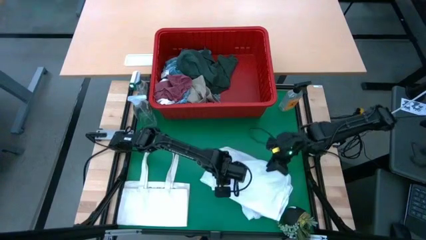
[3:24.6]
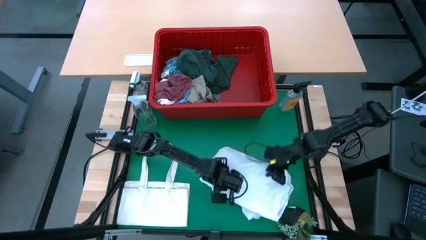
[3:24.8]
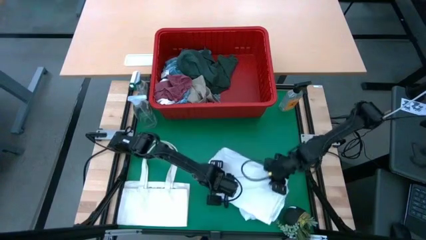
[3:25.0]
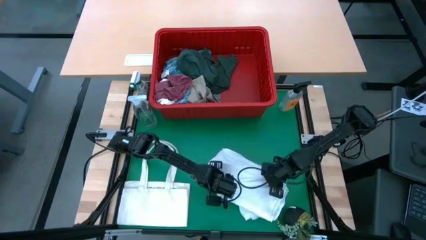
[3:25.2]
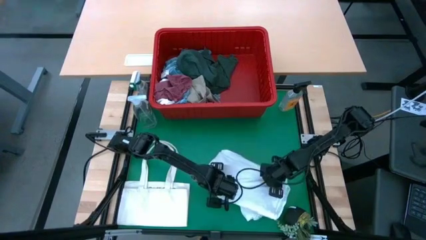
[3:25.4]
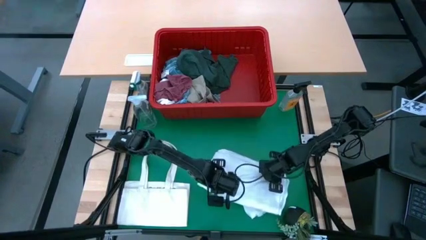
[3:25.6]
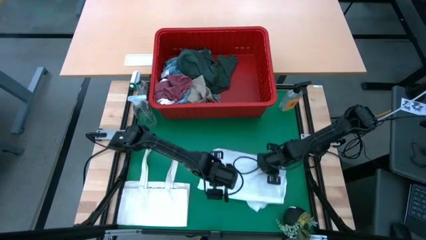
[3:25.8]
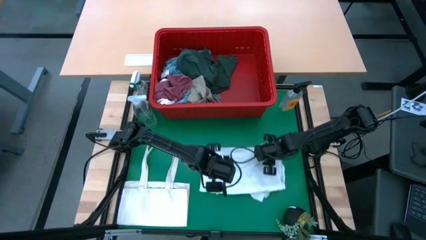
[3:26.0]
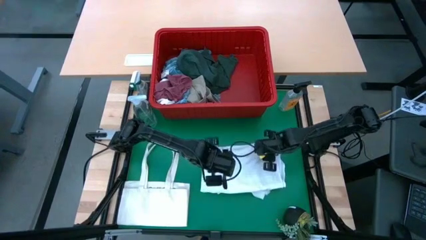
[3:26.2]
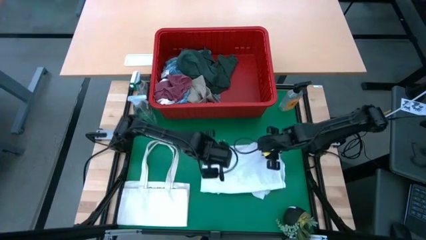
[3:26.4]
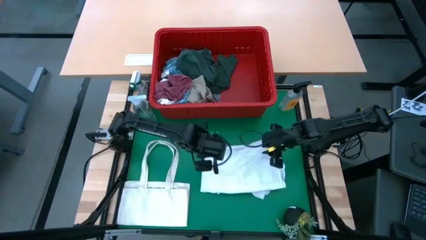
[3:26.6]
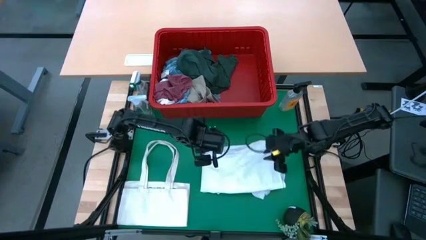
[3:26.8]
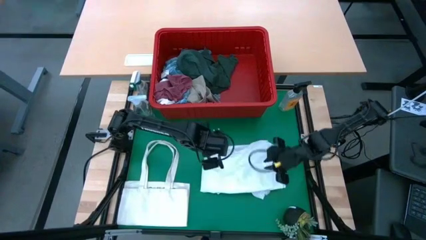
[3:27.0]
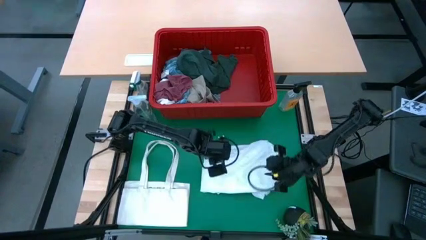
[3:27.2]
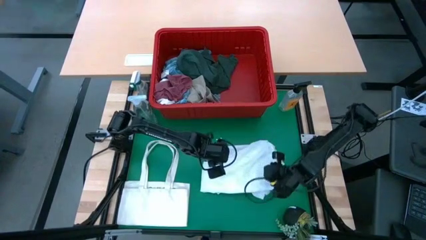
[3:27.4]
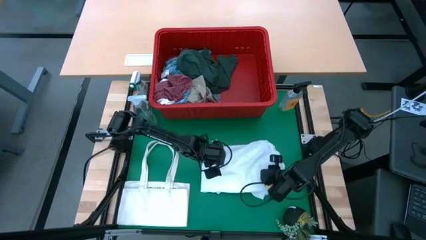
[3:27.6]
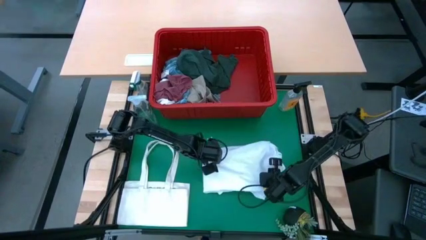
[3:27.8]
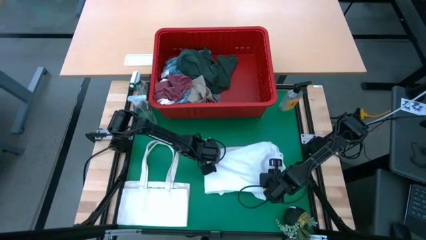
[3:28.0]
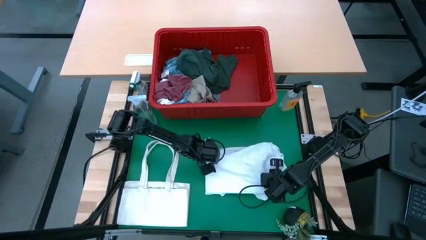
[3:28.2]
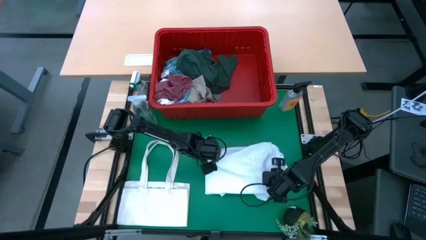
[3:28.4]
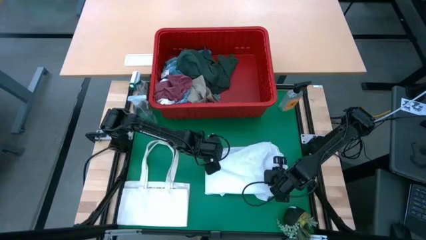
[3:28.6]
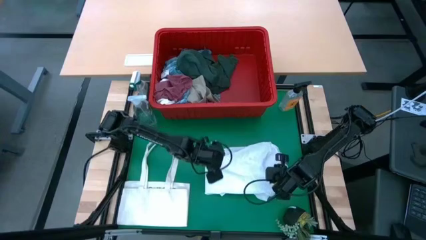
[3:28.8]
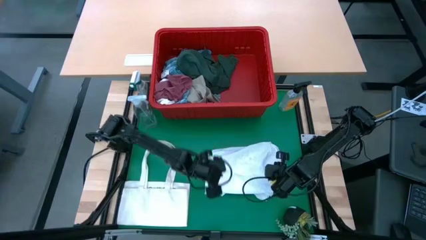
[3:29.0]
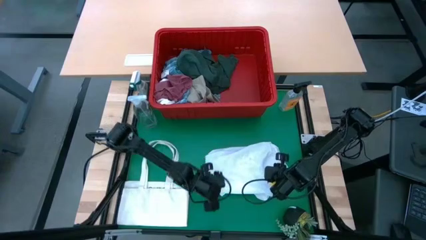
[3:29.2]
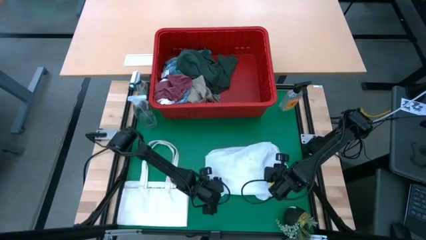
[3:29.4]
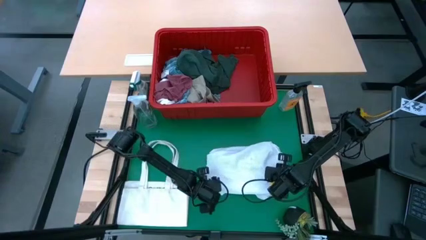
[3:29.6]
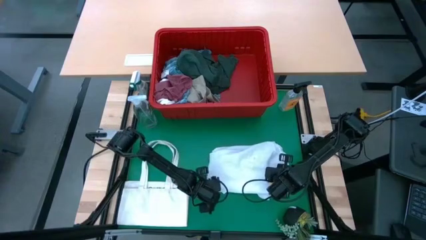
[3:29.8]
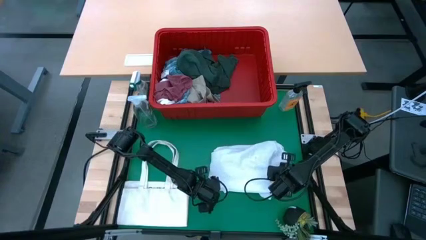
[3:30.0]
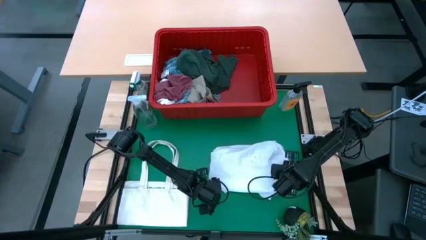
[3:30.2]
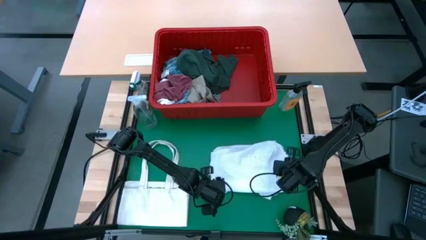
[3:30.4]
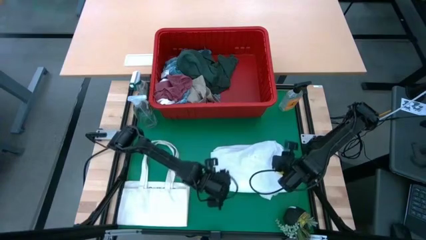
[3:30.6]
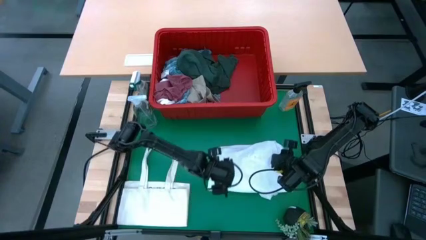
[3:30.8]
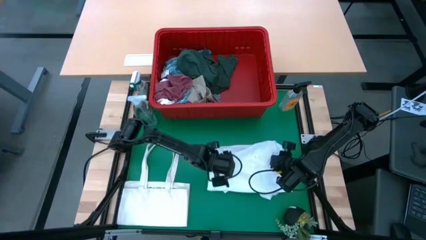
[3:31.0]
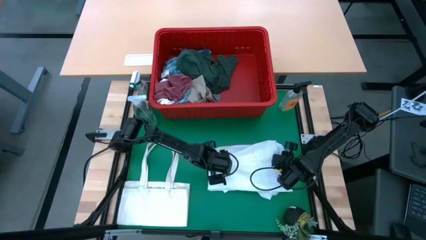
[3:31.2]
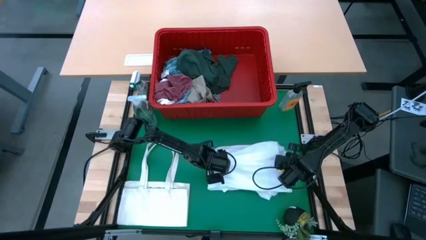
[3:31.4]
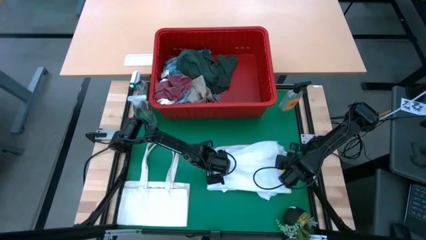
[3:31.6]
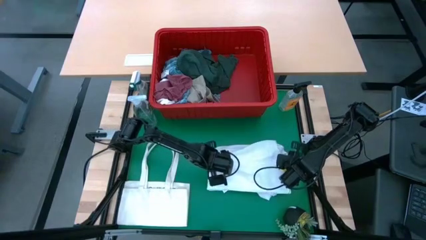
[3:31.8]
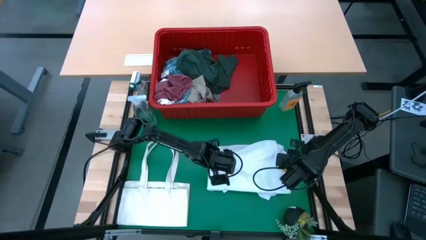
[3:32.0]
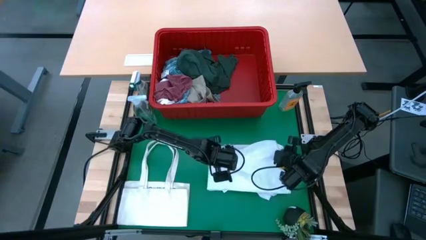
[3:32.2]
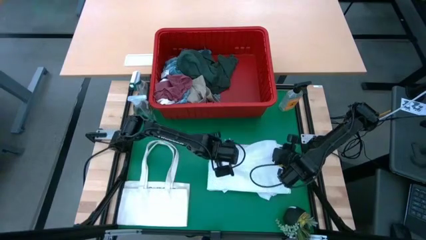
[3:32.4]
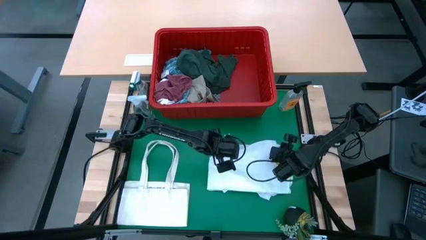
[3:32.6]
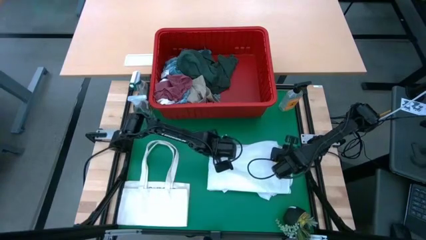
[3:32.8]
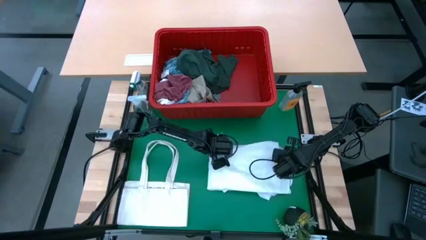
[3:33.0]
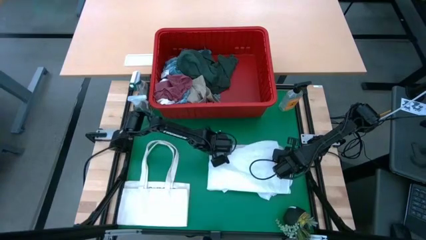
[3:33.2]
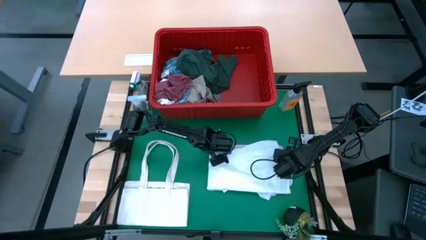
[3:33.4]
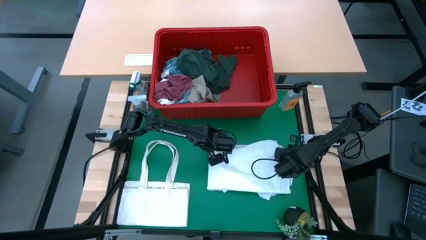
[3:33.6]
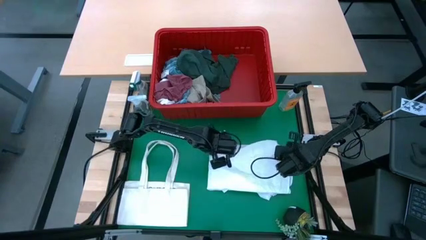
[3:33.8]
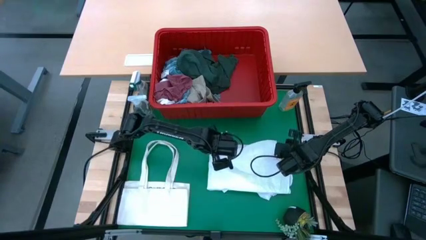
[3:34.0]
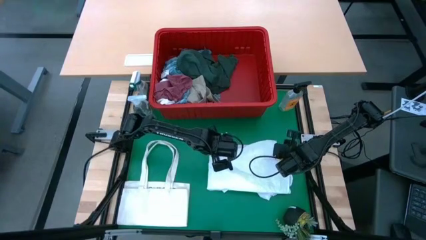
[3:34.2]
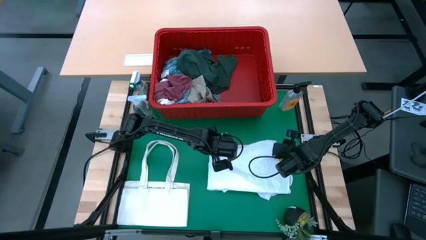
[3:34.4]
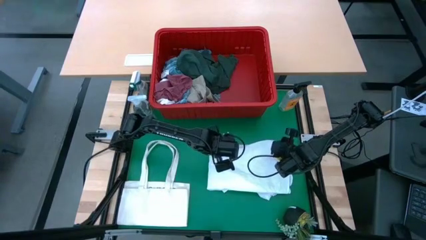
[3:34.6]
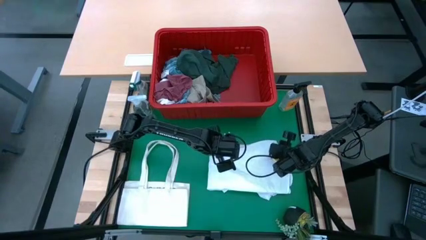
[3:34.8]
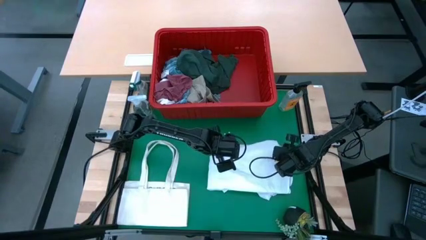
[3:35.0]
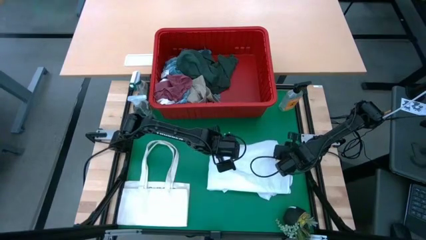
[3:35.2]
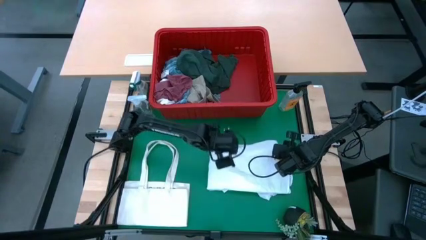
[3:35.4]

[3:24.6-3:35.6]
Task: Fold Laundry from Bin
Fold the white polo shirt
